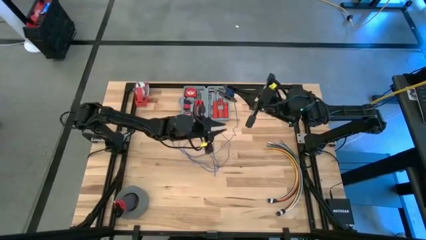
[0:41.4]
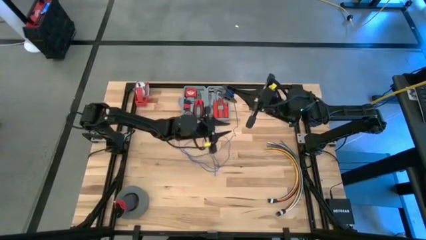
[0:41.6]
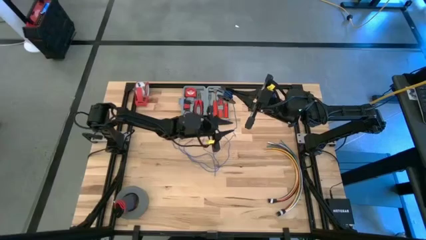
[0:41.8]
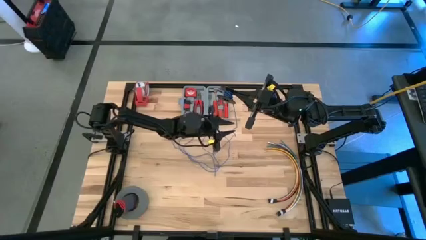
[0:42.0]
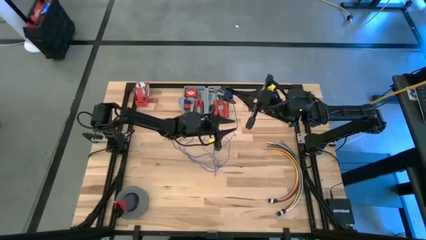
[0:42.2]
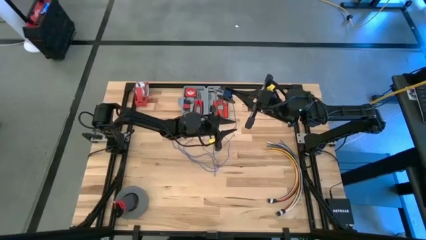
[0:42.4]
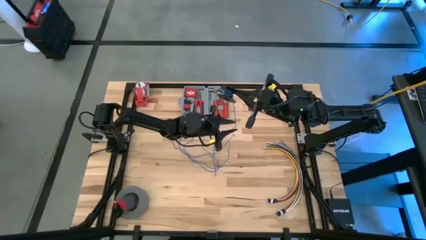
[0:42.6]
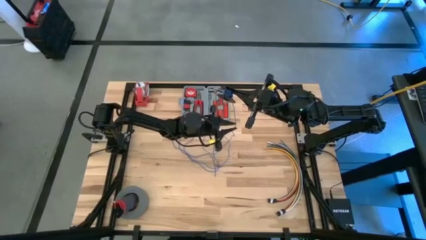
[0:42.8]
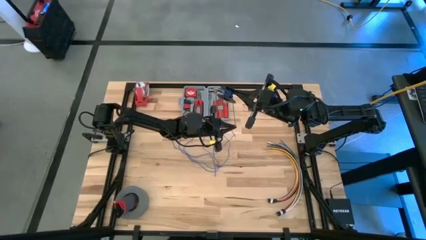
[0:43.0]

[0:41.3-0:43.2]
Task: Coil cords
Coil the blue wire into the black spool

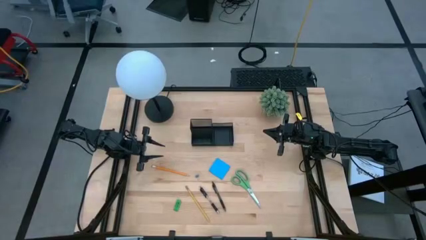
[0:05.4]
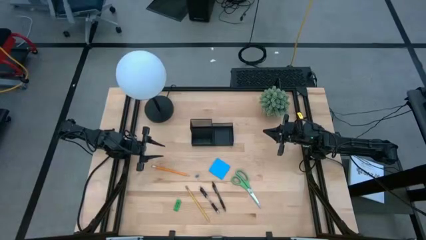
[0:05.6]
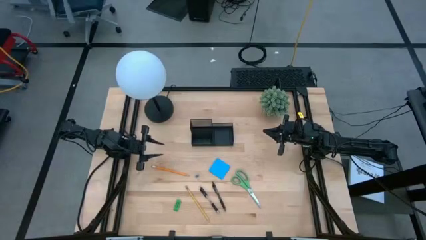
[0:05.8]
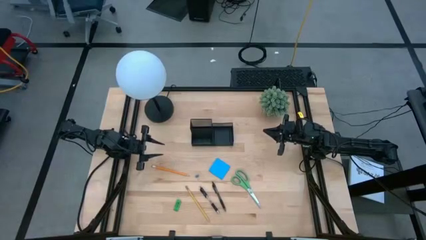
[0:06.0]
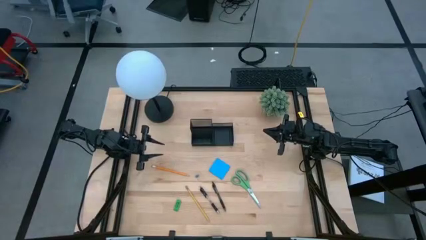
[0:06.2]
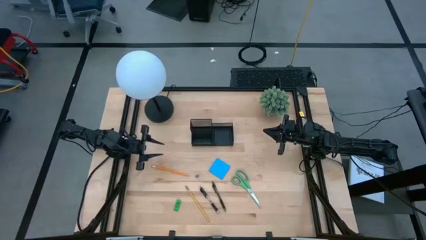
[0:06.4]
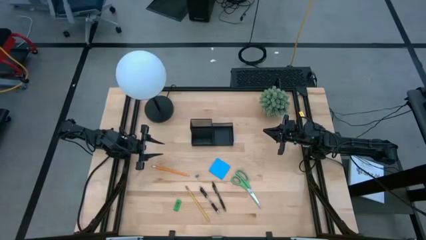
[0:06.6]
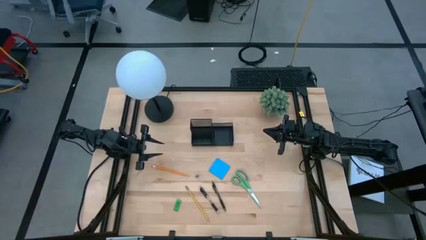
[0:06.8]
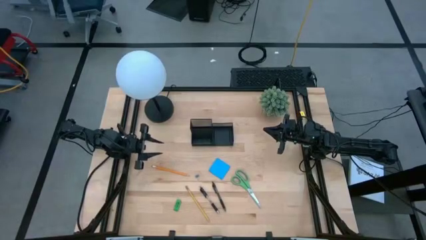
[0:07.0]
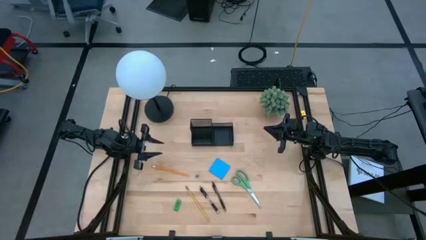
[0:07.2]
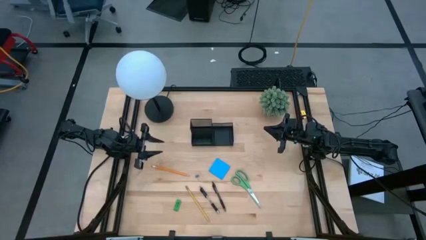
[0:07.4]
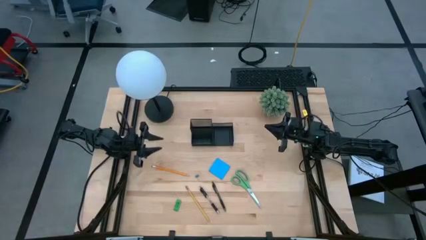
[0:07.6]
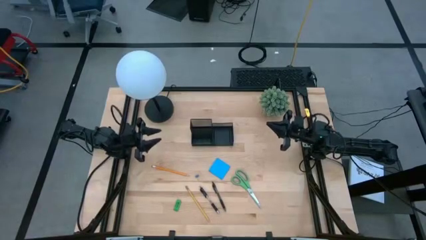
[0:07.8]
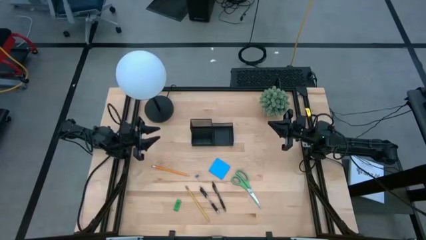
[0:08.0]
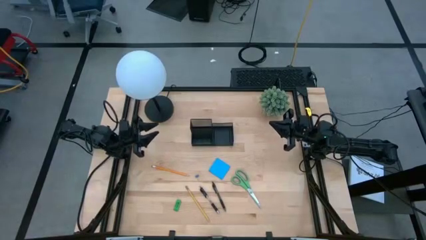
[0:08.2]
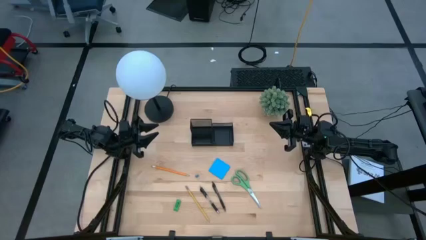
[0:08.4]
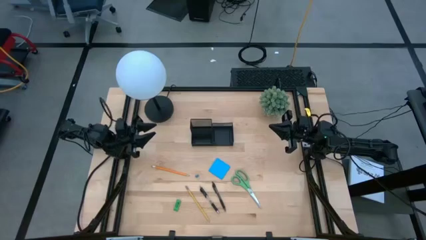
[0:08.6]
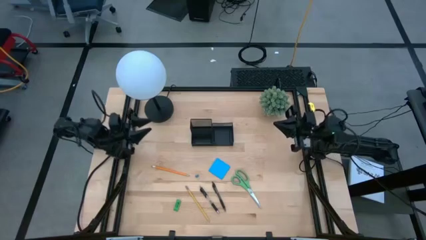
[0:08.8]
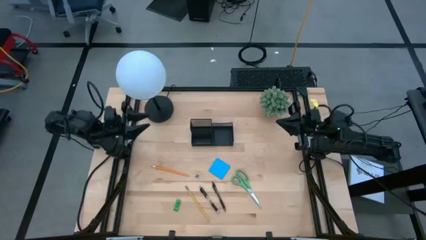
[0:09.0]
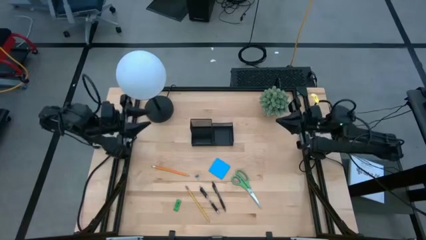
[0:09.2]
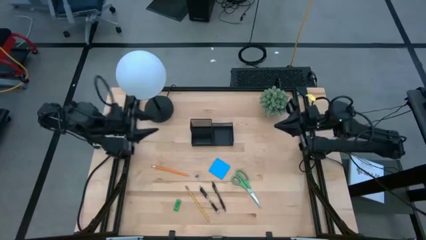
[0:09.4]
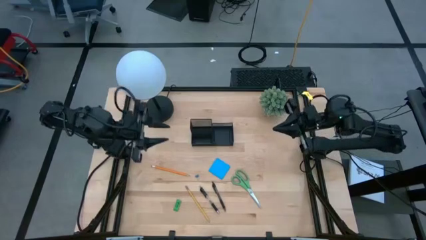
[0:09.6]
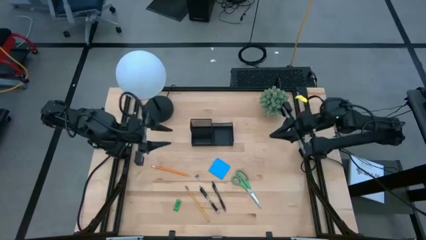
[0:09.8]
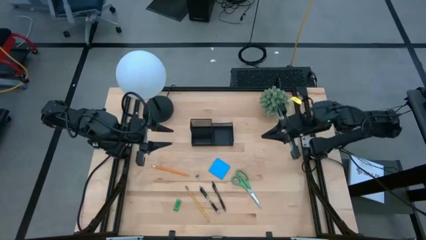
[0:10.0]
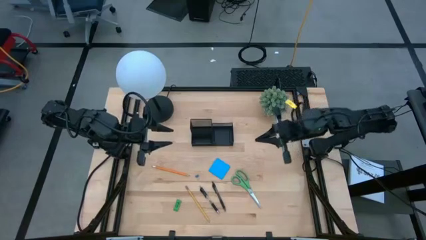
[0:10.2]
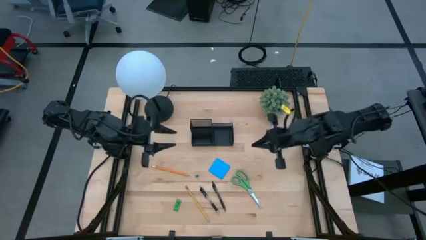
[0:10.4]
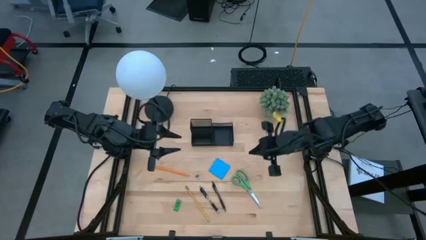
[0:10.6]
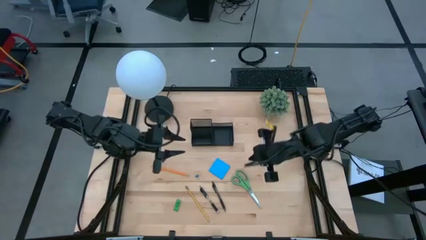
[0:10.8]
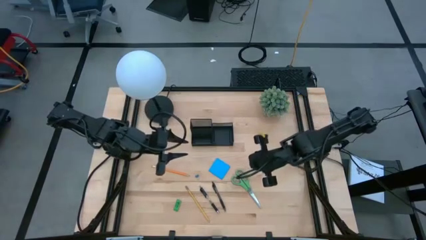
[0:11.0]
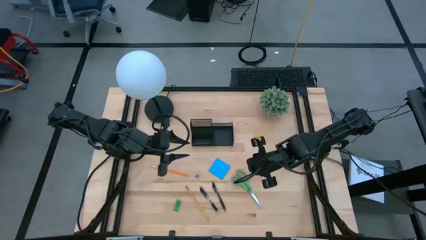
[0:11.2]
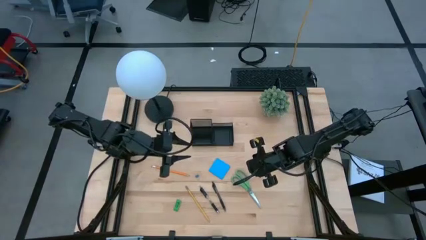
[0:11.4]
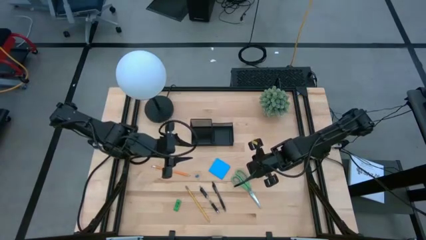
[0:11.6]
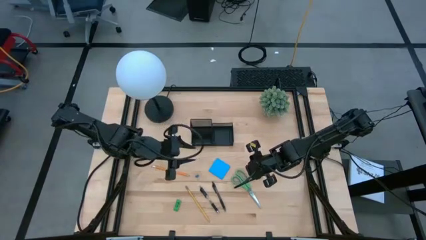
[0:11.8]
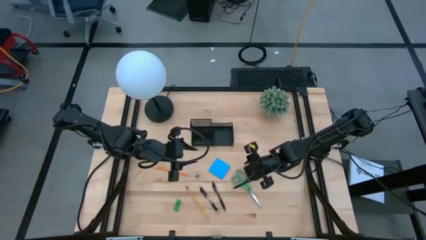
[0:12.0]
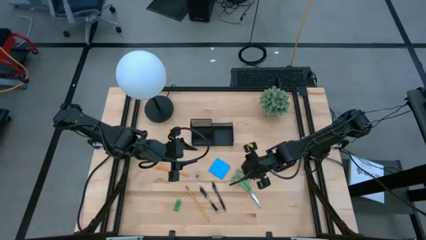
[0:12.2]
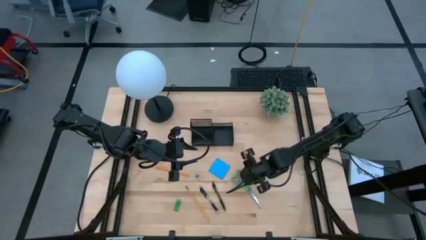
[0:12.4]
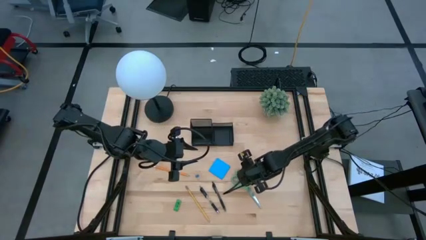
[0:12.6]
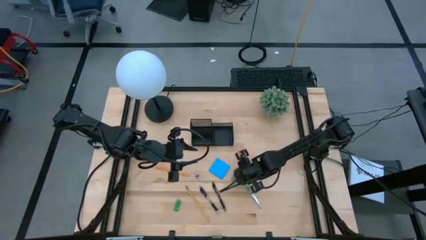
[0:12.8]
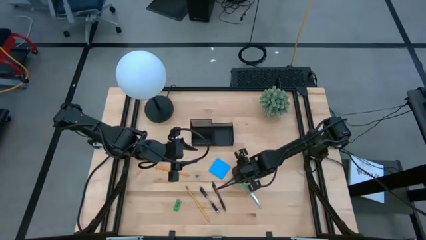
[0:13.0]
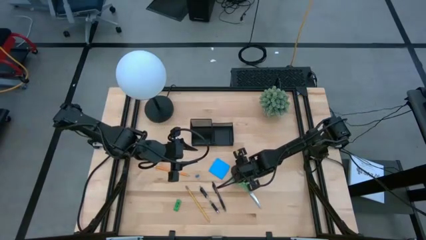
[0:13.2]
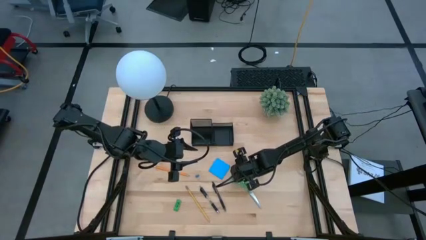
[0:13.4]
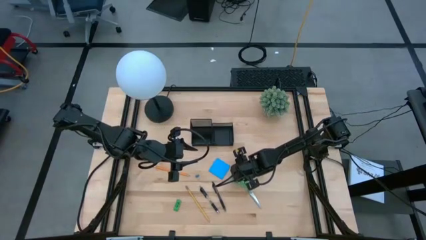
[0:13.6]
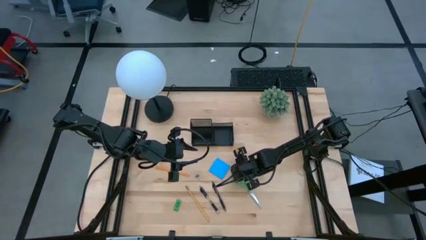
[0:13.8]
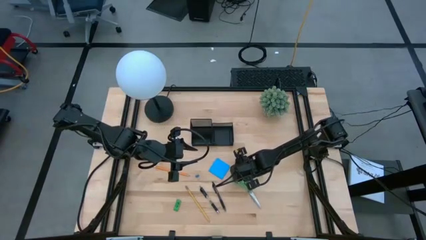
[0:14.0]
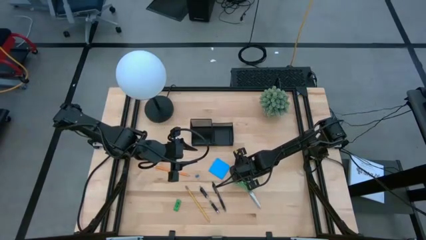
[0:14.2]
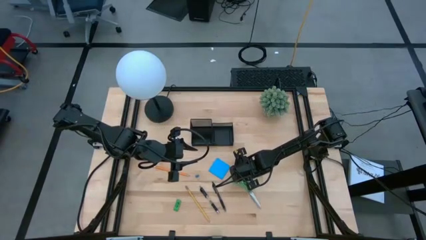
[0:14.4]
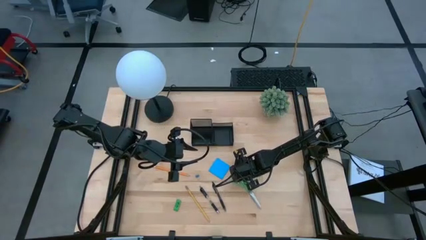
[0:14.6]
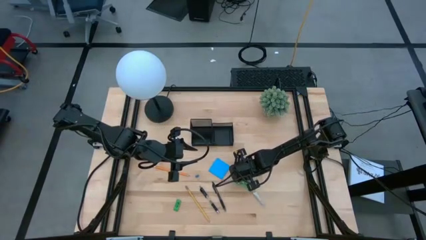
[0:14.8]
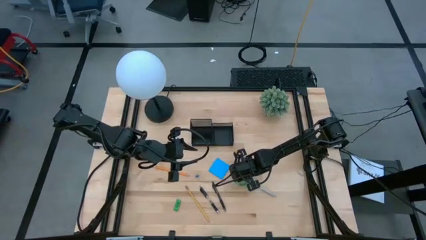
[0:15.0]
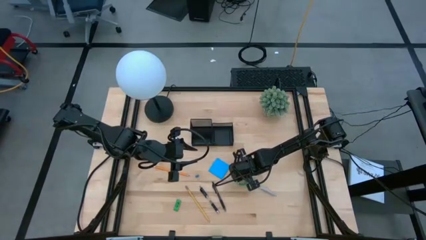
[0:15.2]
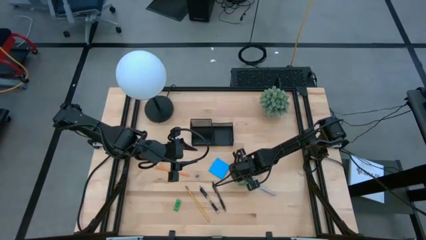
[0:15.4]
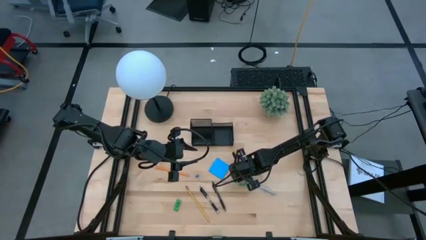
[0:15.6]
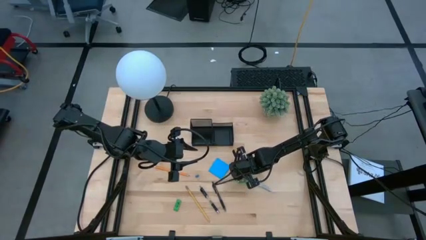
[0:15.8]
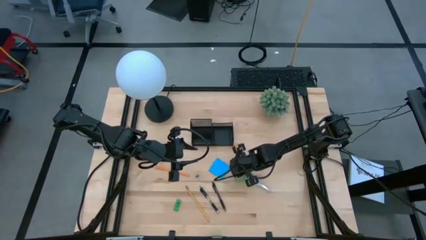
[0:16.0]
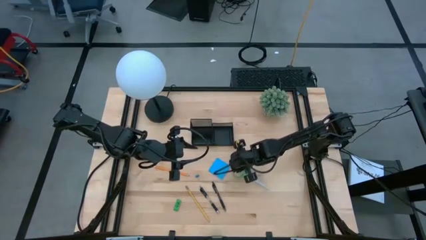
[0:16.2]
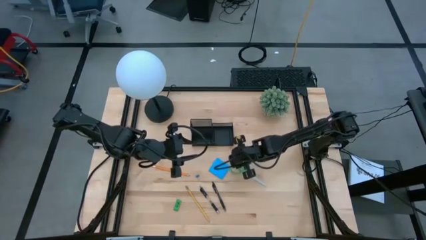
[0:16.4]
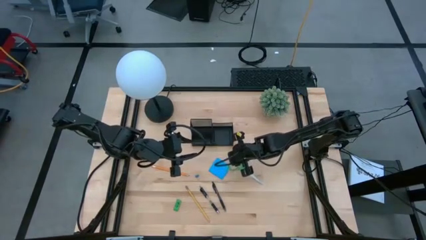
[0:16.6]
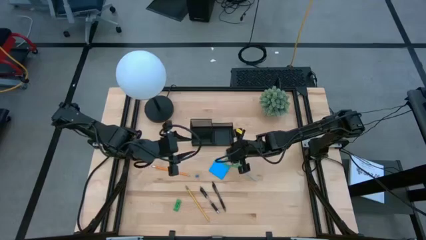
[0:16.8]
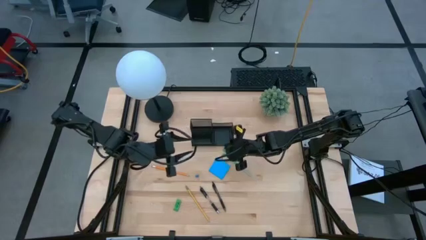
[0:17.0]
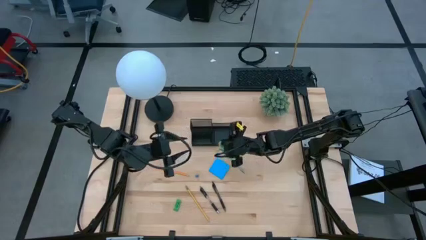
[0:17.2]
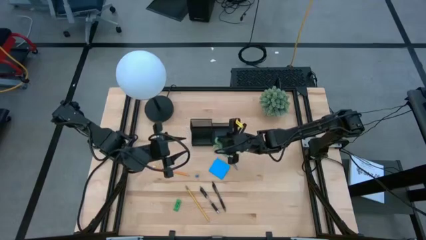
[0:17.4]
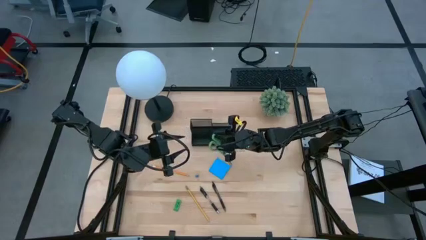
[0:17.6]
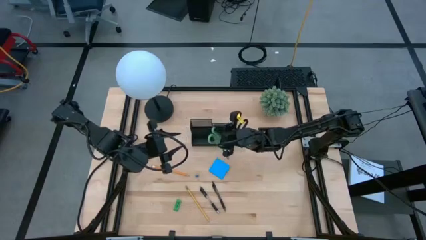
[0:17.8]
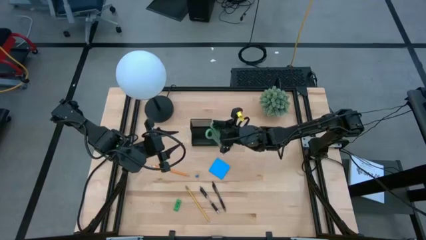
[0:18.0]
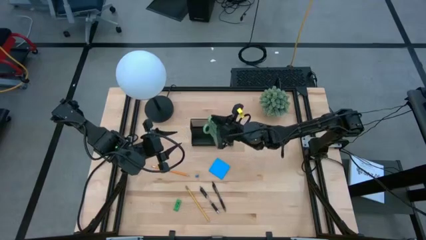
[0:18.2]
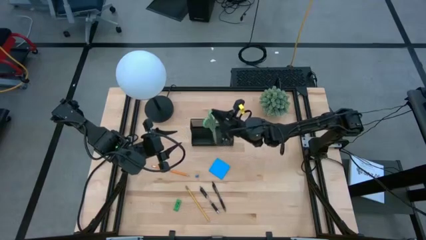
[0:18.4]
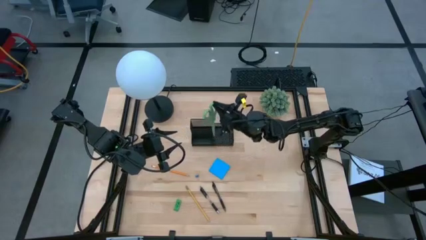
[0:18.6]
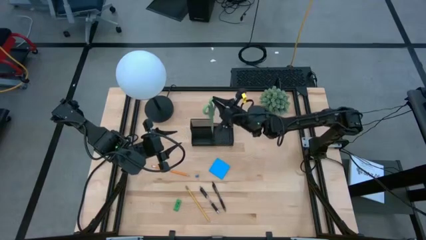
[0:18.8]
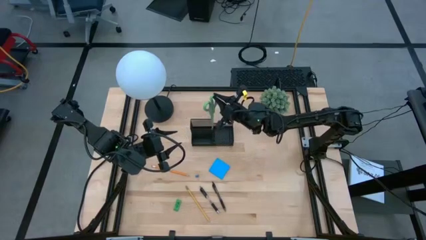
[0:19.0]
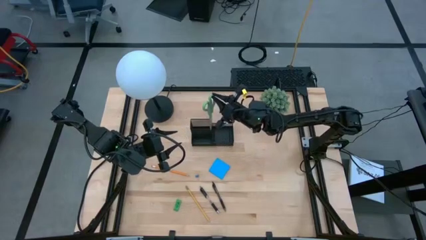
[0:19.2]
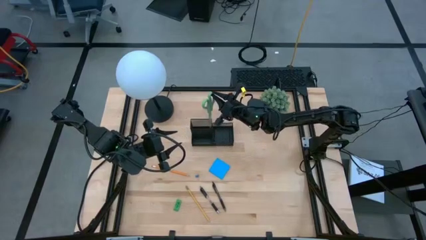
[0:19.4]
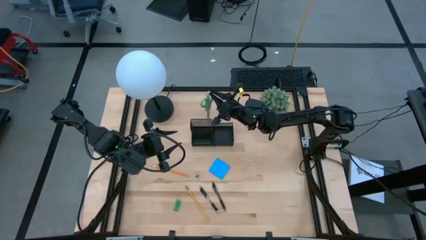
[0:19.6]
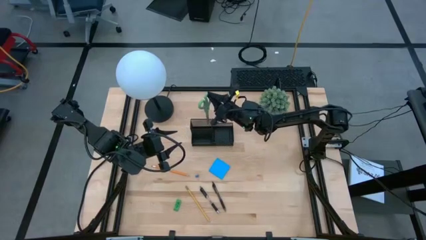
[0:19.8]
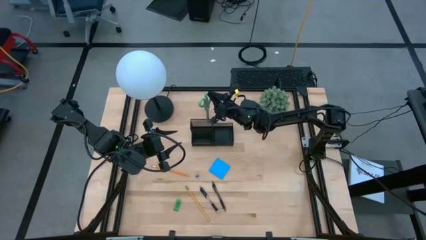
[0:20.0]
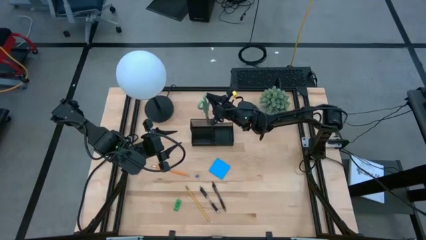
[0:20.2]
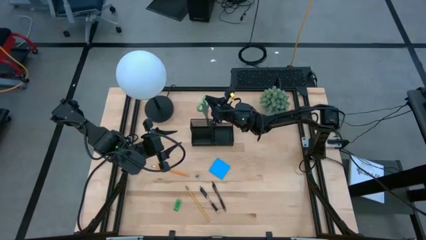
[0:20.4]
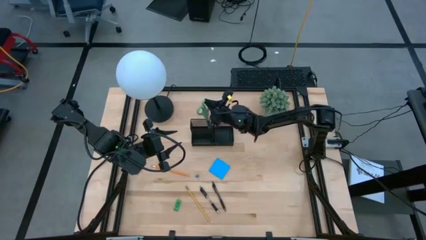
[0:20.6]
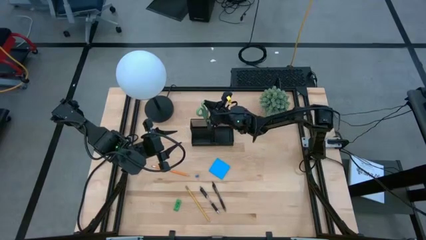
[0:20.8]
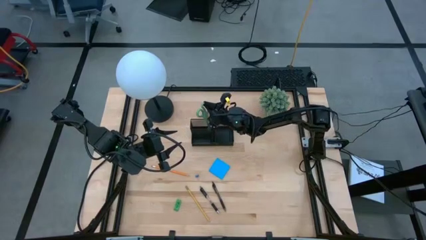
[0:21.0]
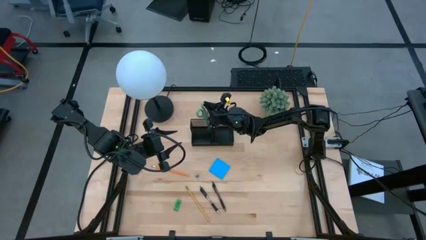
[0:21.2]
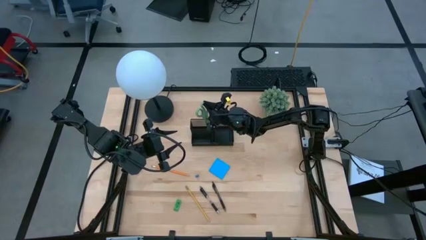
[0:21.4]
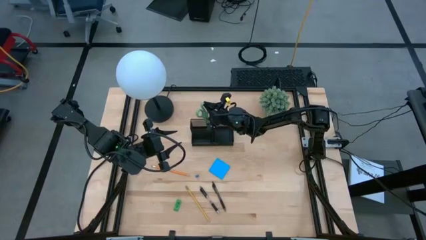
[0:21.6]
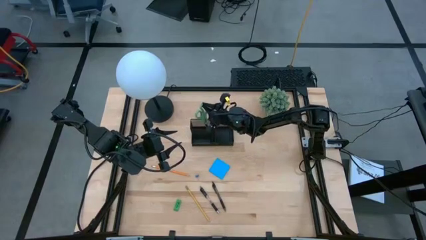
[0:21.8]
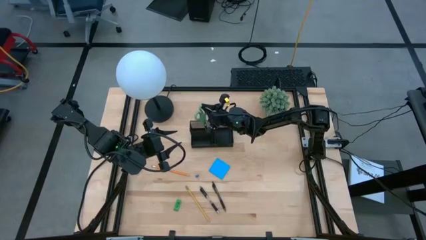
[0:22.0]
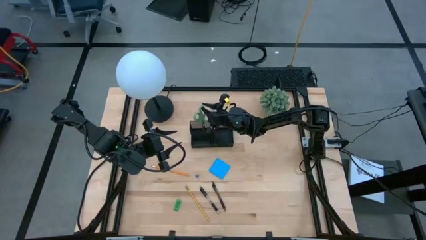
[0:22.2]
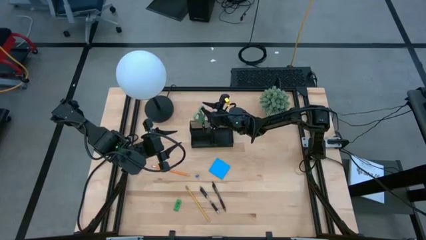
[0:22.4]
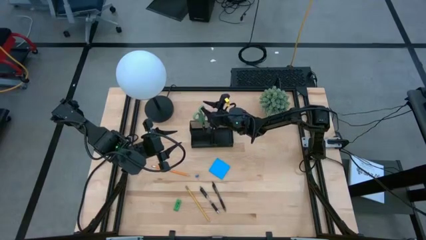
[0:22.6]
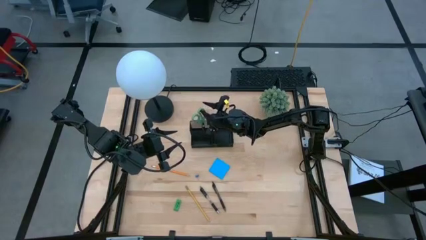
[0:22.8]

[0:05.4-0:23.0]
Task: Pick and place office supplies into organizer
Put the green scissors into the black desk organizer
